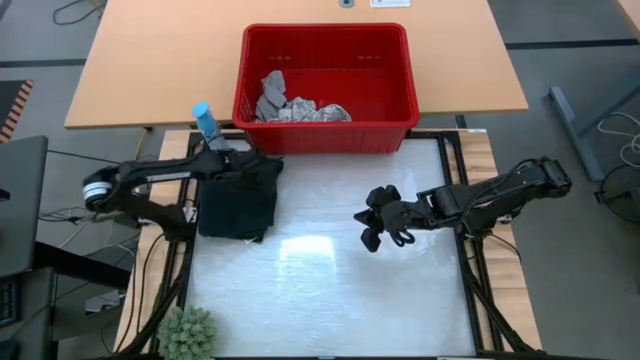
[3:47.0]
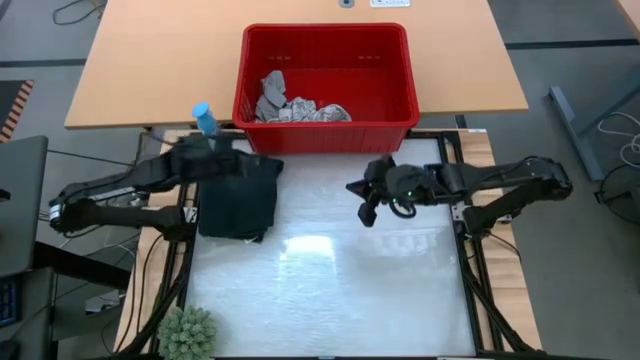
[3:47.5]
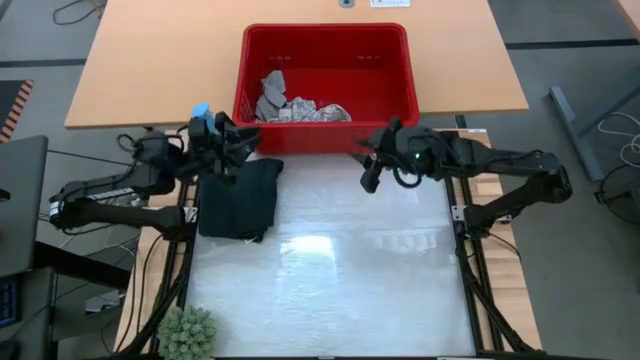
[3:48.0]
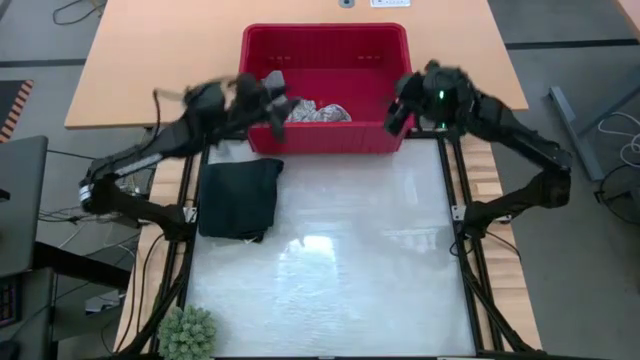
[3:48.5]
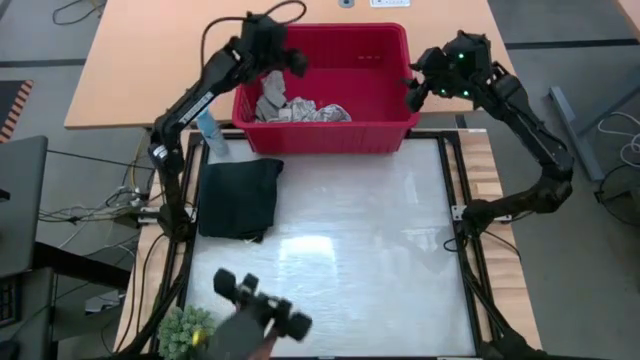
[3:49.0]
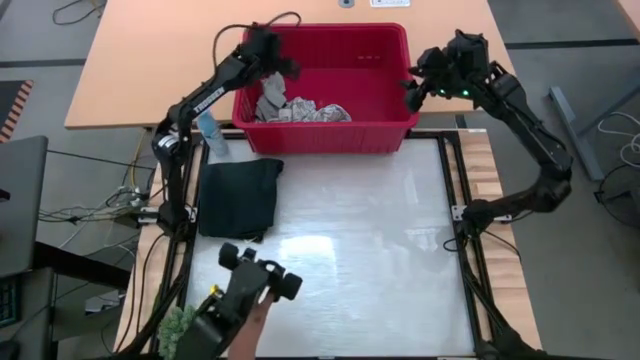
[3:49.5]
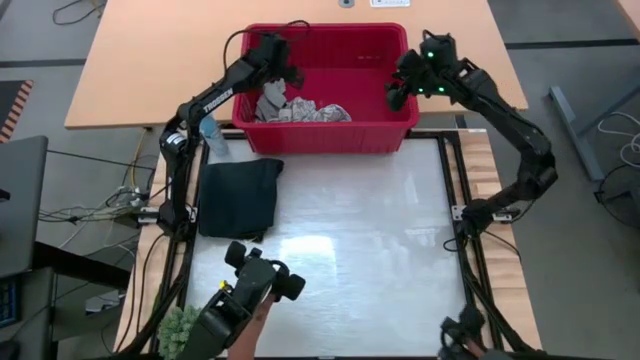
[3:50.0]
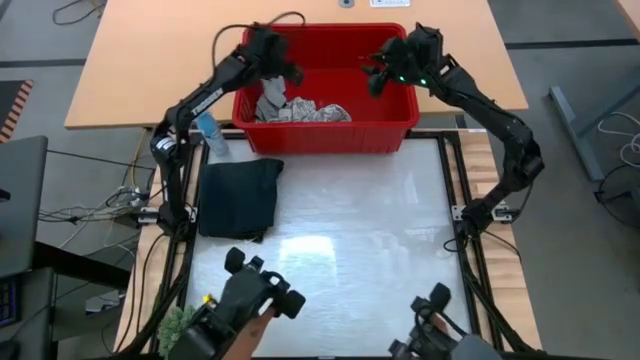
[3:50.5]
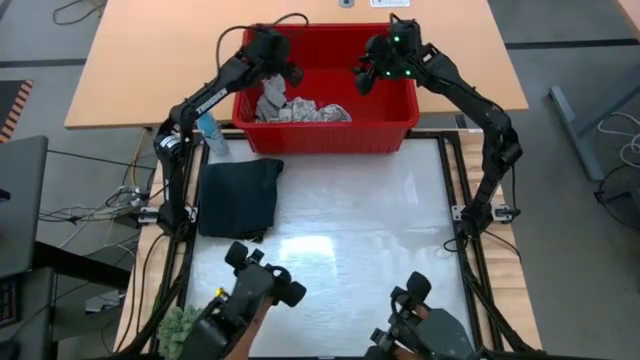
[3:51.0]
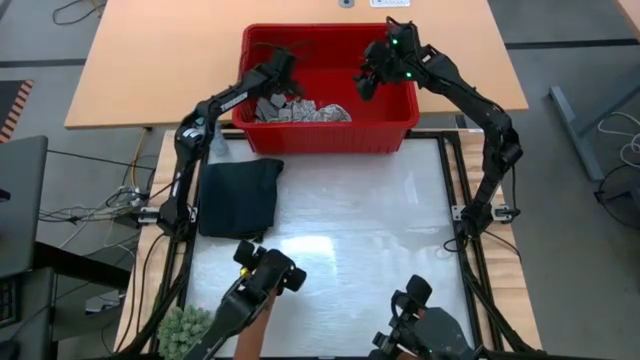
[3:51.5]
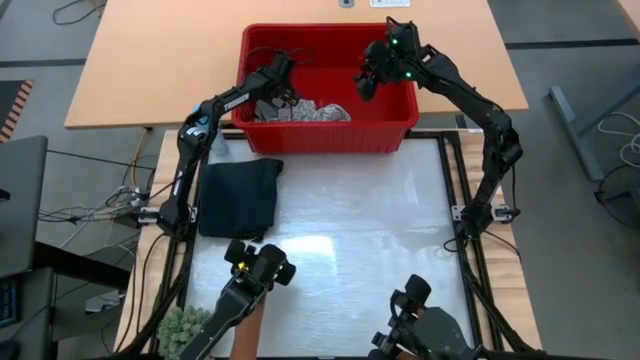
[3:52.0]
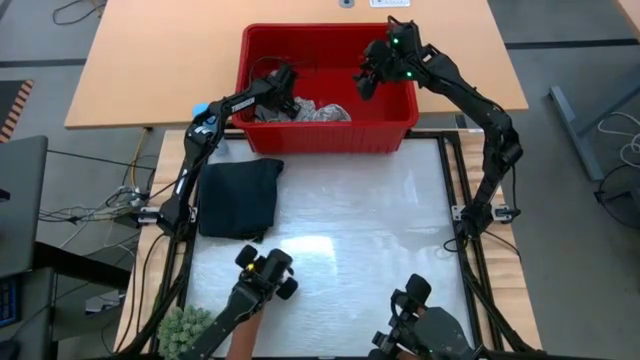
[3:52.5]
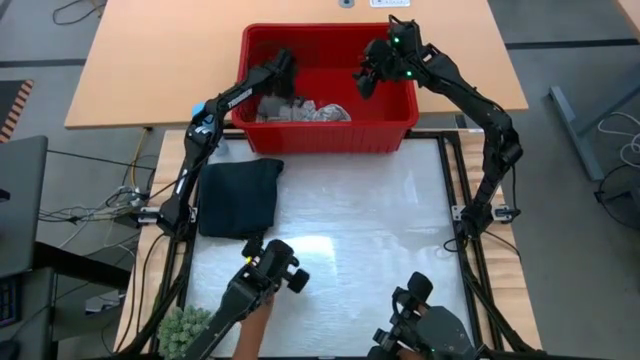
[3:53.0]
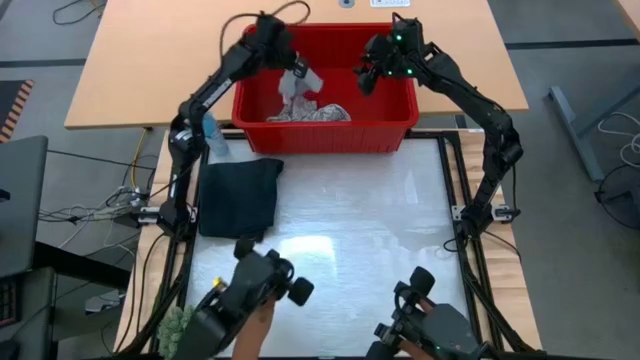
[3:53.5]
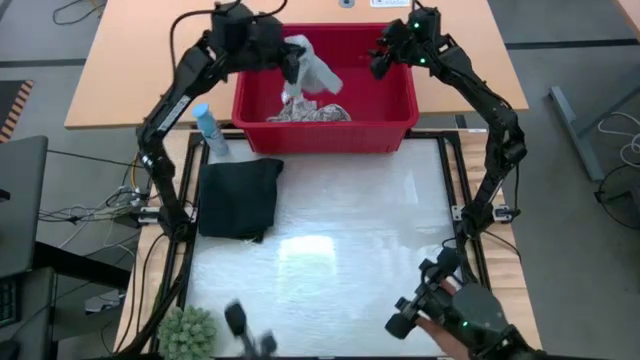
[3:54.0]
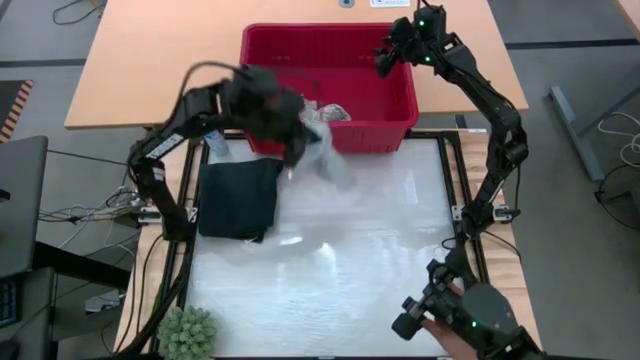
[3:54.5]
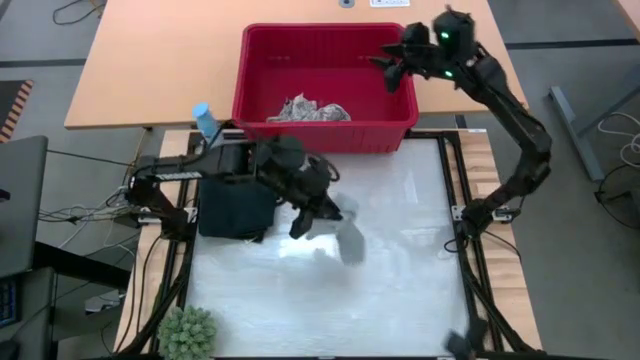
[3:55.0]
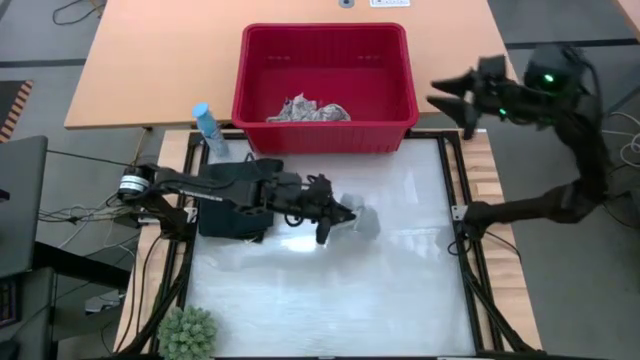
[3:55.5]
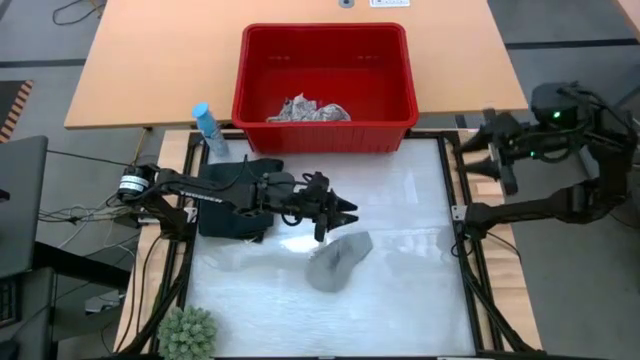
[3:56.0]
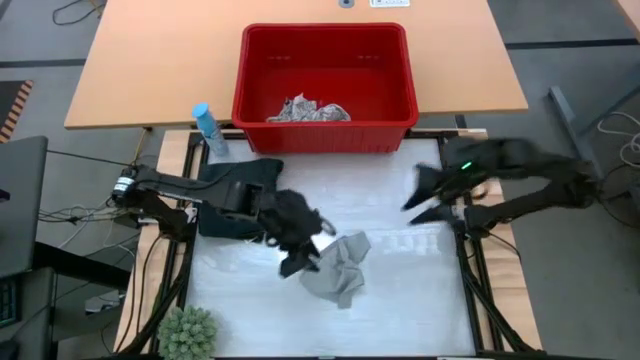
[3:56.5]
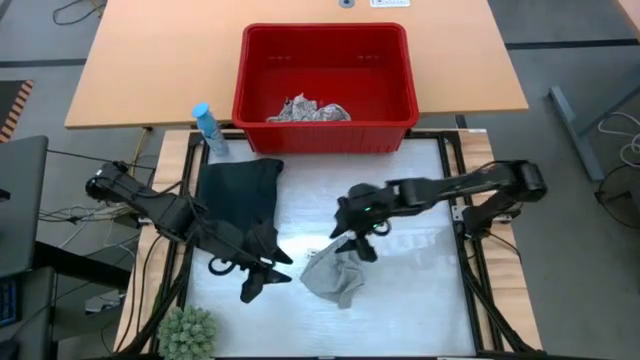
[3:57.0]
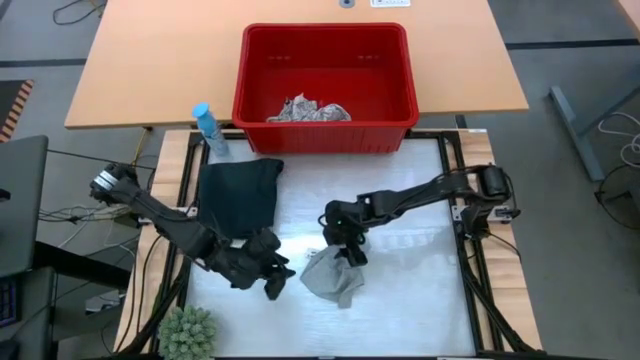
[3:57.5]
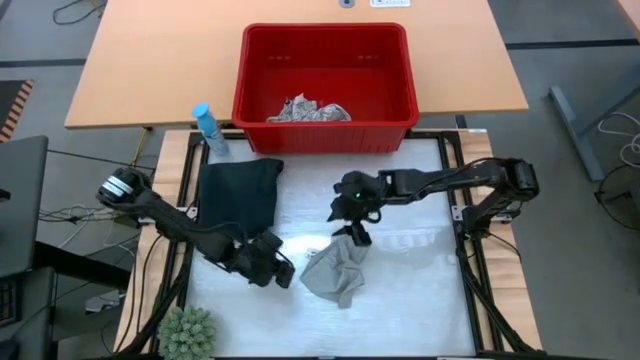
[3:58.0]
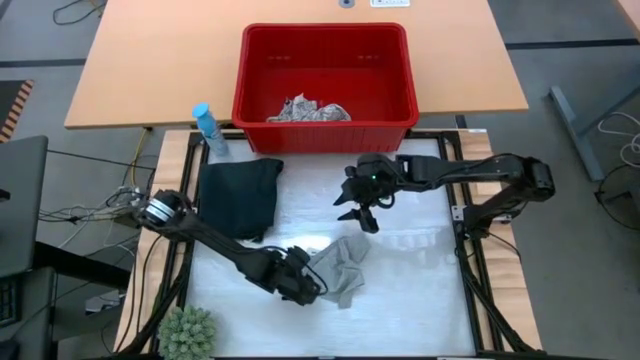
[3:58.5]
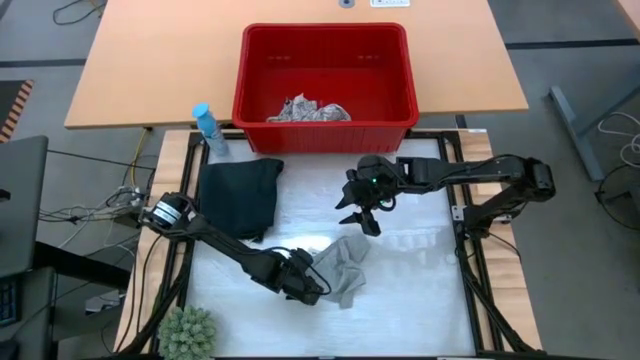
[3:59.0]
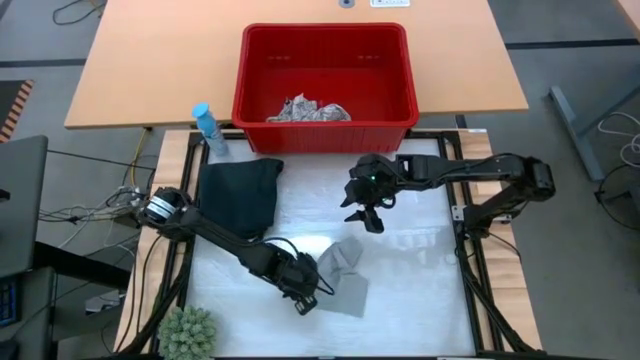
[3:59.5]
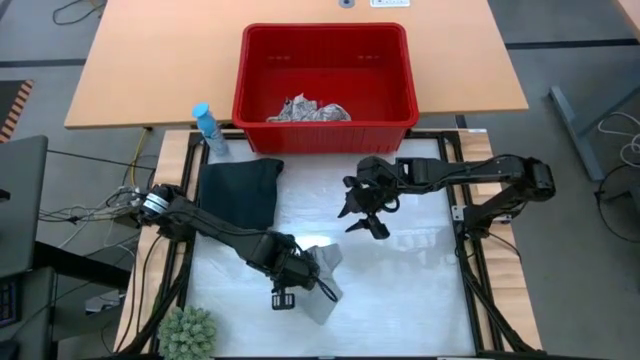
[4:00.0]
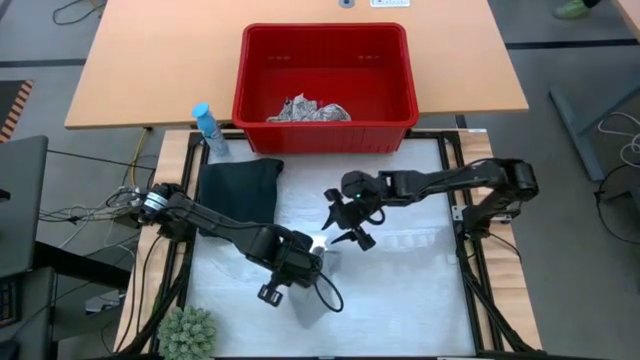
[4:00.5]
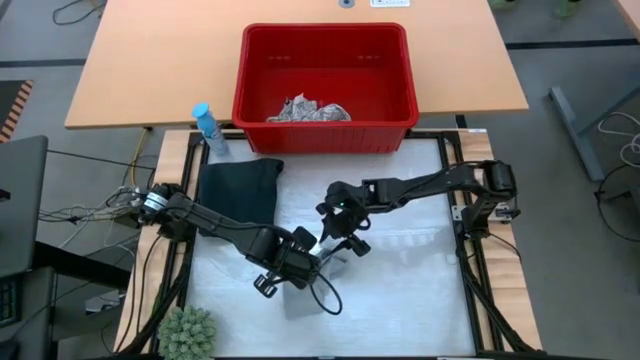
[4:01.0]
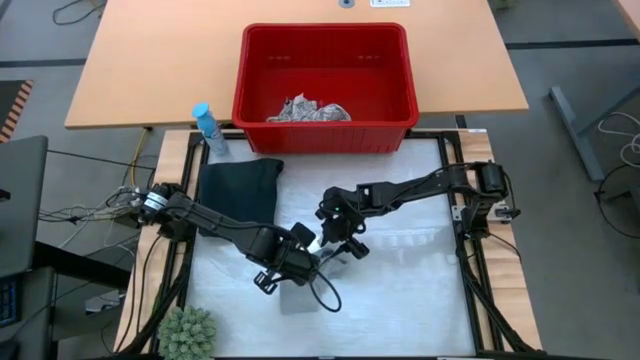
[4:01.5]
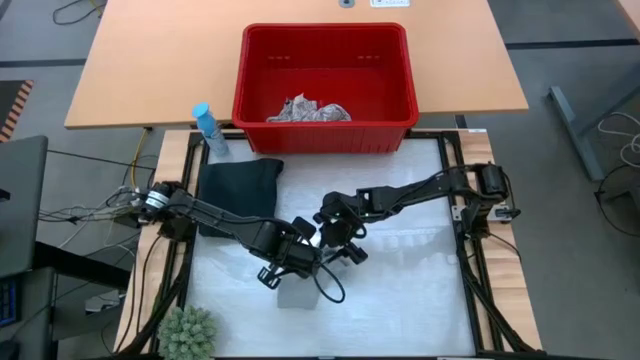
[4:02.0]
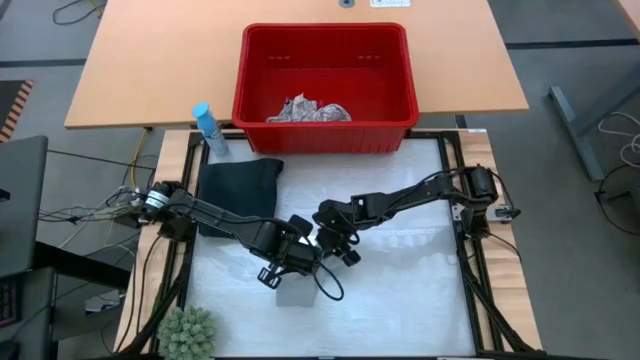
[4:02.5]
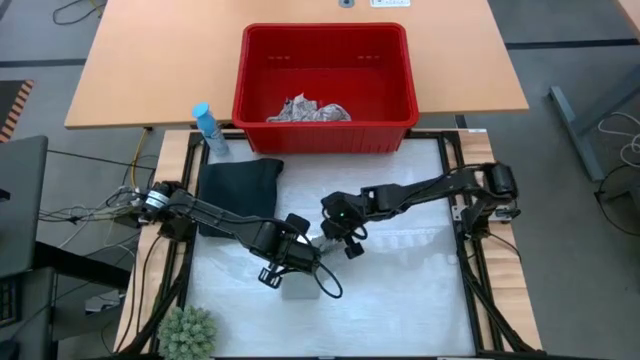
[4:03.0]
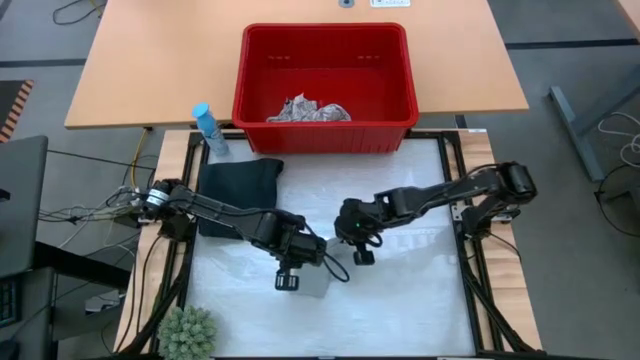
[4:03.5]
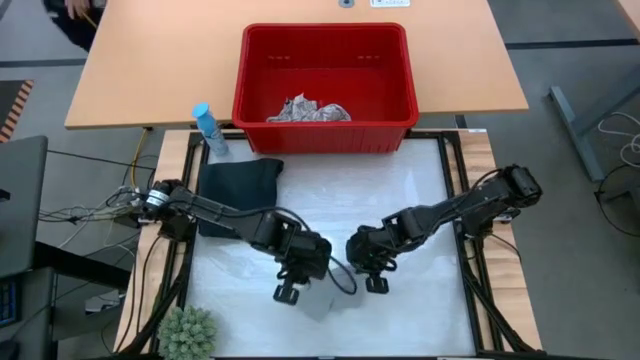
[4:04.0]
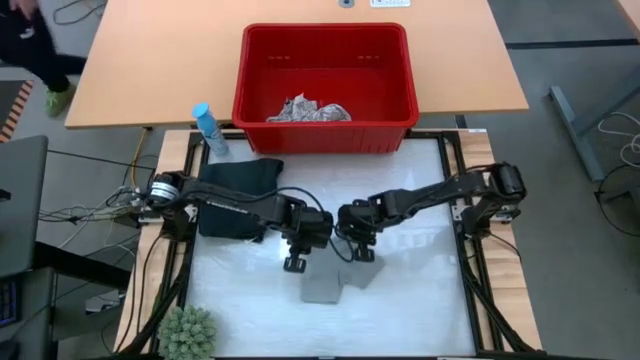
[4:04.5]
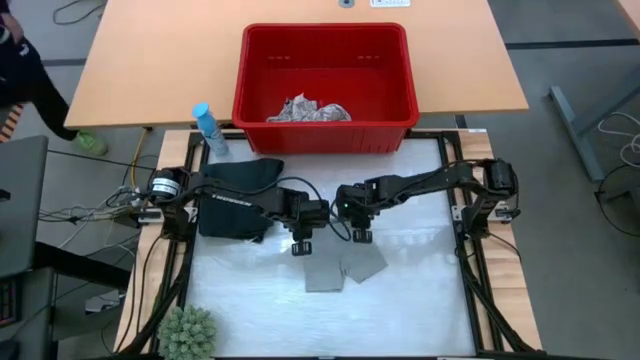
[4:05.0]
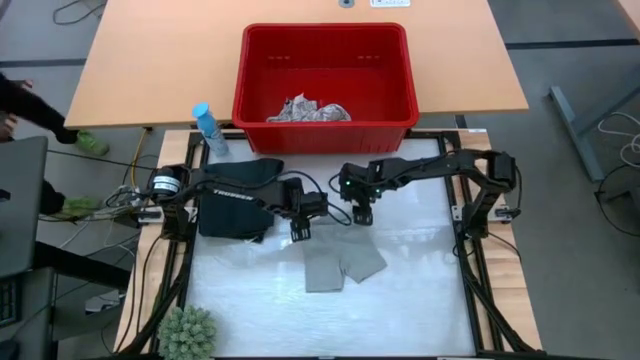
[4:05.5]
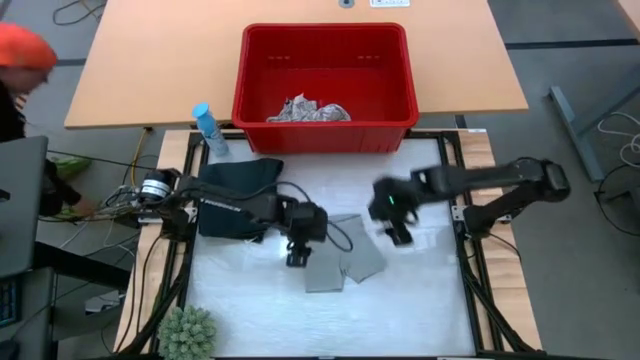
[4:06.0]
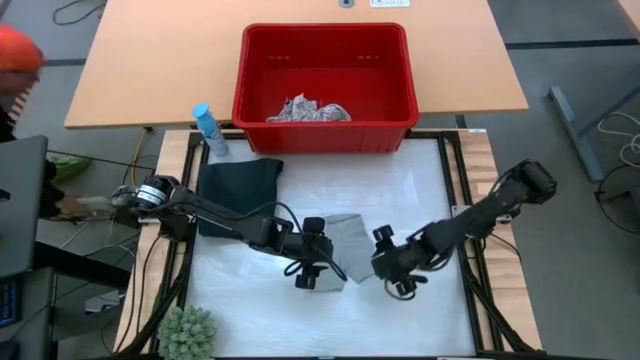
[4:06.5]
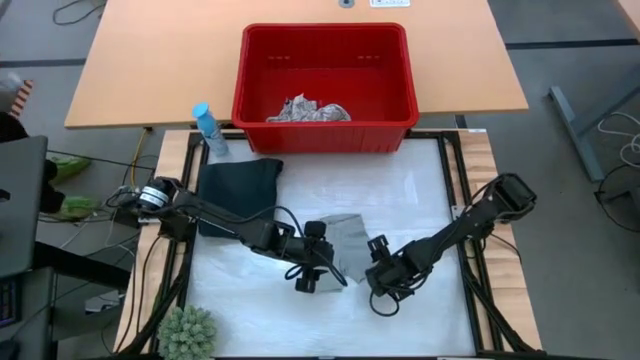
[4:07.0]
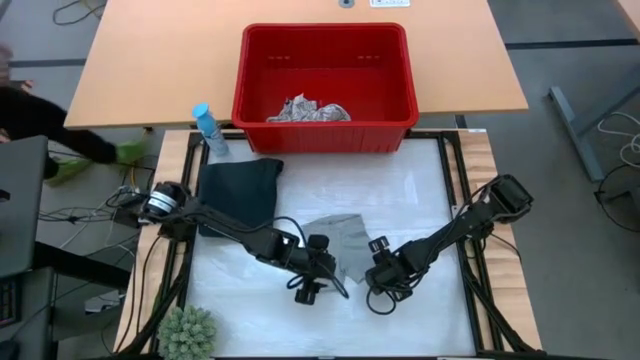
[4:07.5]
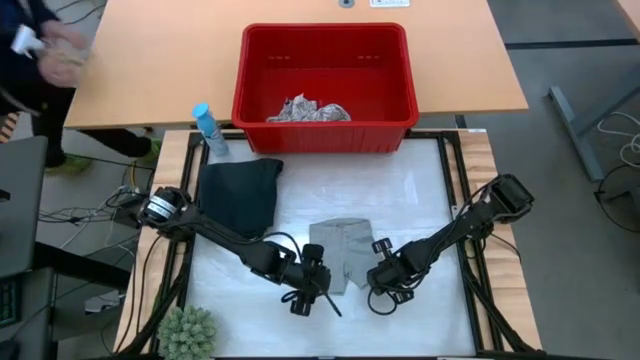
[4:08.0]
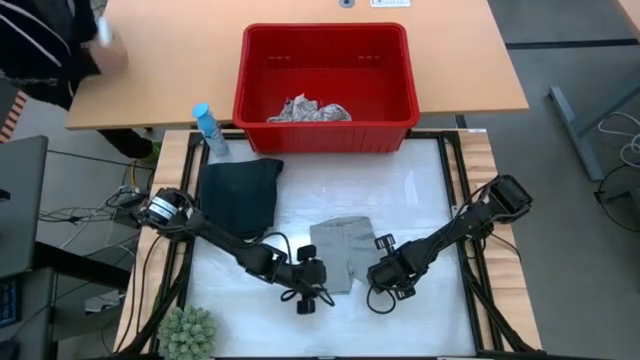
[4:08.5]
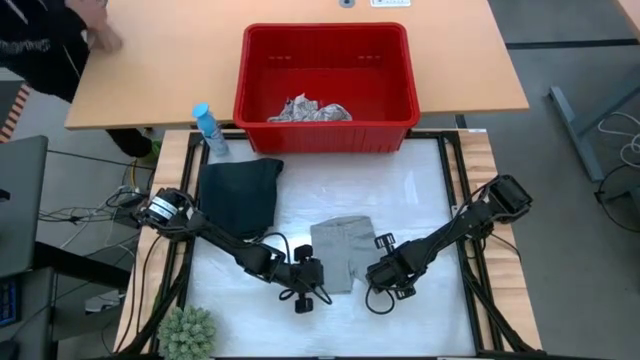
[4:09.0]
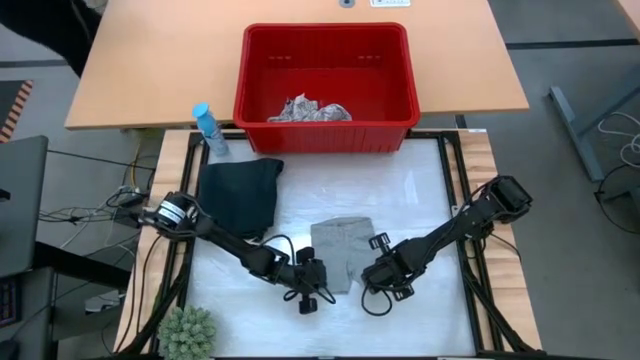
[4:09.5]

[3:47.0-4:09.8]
Task: Fold Laundry from Bin
Fold the gray shorts
